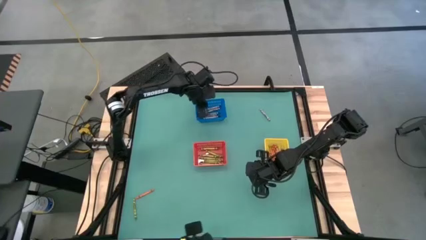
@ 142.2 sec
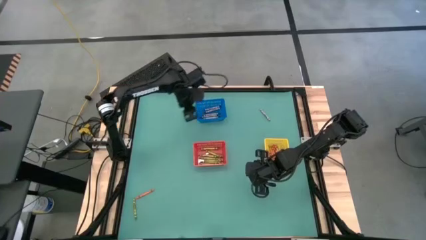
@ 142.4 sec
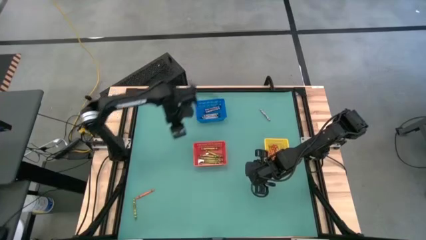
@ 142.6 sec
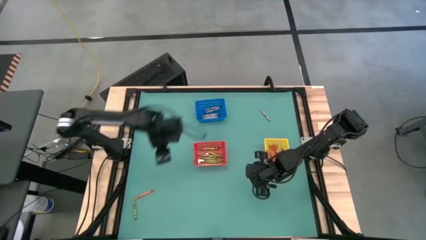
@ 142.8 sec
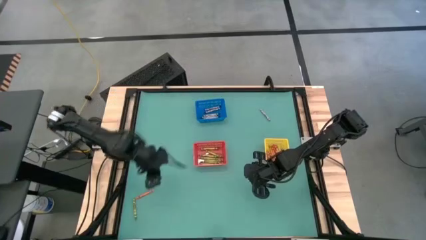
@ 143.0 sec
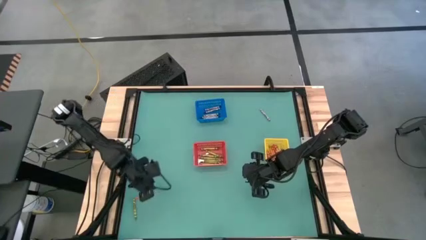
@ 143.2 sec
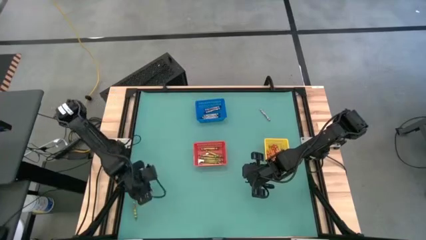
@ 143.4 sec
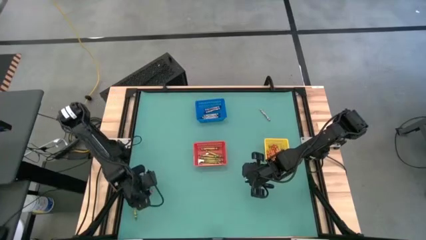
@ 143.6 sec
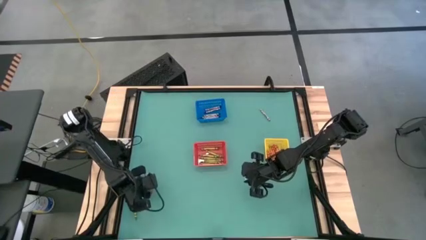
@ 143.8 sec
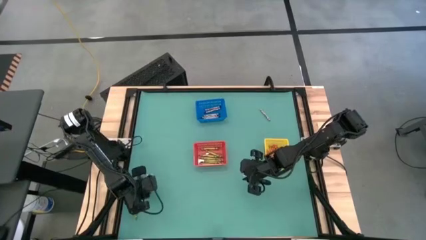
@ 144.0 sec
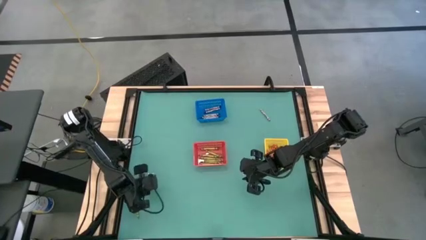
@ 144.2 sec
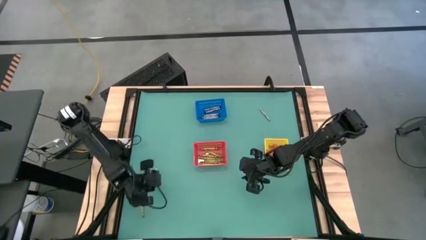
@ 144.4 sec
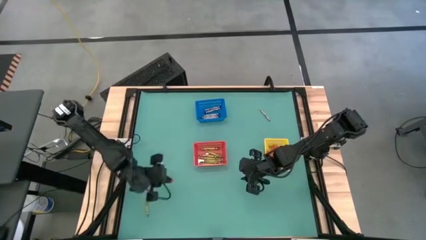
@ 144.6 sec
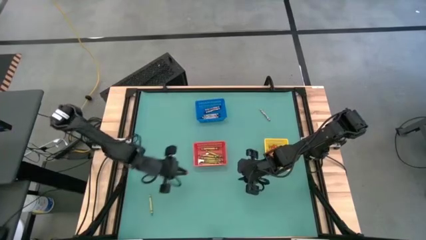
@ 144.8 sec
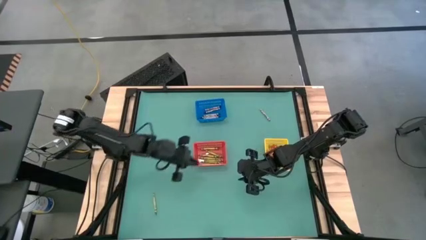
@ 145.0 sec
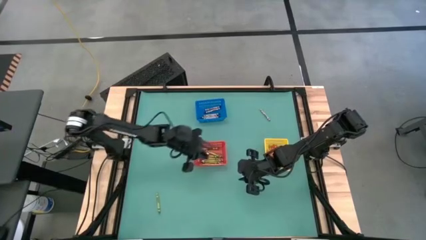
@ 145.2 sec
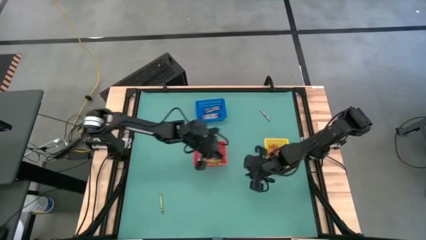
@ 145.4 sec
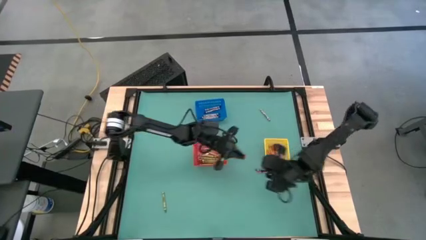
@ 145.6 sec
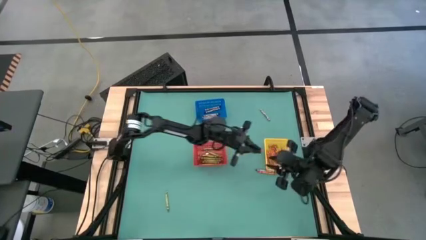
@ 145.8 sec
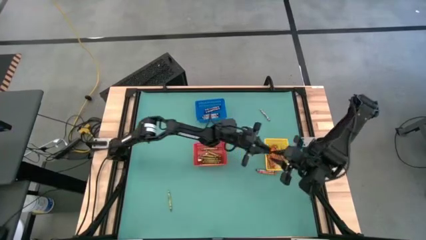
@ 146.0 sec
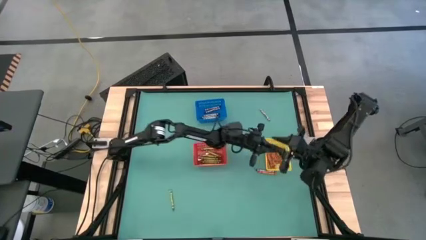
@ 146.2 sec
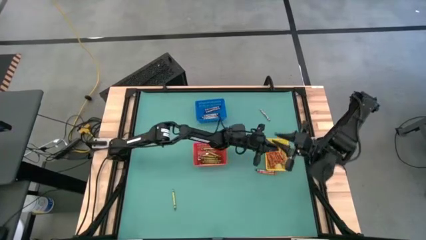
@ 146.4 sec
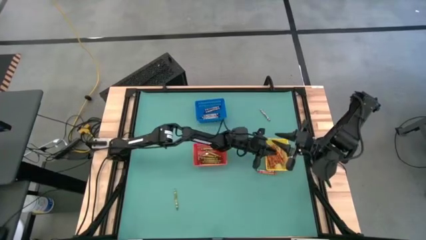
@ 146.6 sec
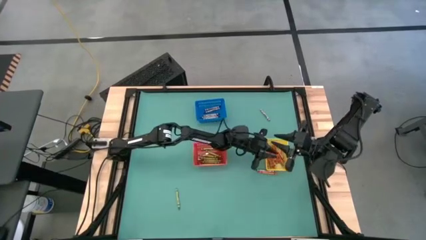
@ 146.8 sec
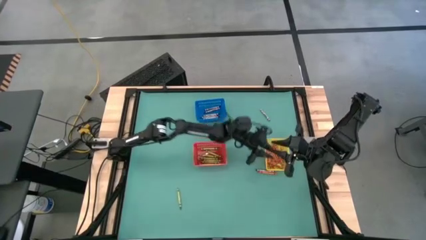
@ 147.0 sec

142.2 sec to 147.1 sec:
Task: Sort crayons
Put the orange crayon into the yellow bin

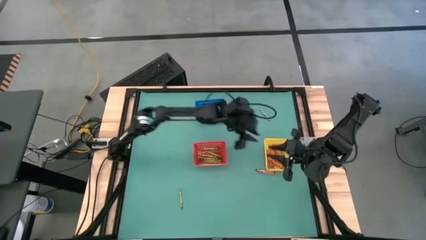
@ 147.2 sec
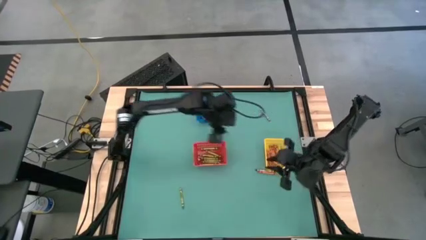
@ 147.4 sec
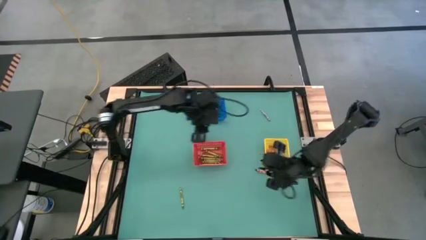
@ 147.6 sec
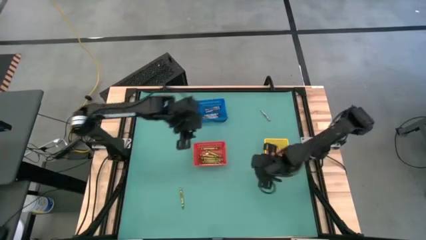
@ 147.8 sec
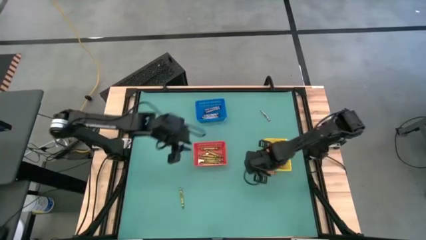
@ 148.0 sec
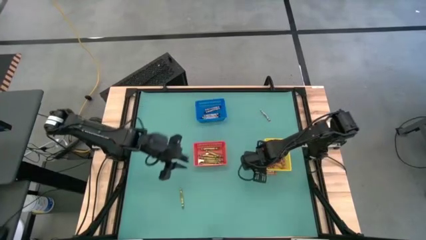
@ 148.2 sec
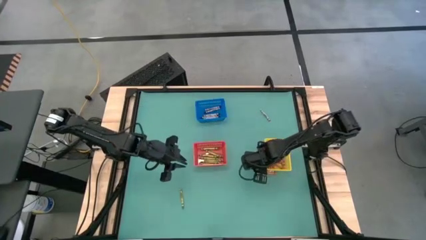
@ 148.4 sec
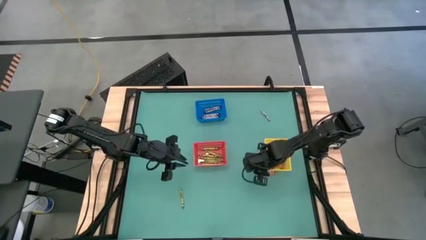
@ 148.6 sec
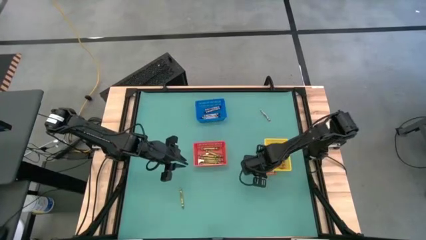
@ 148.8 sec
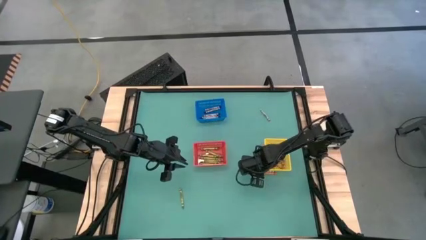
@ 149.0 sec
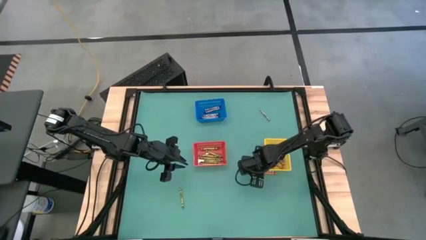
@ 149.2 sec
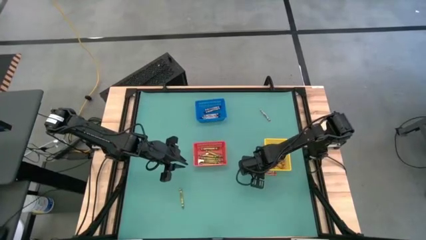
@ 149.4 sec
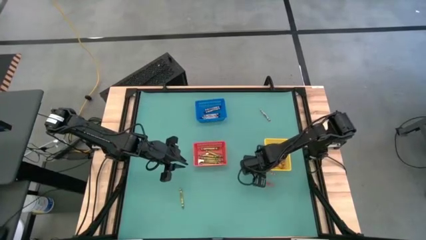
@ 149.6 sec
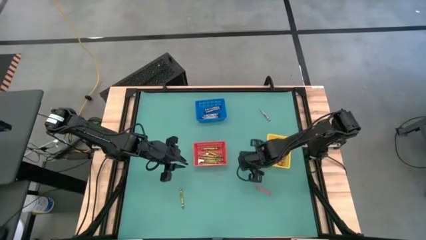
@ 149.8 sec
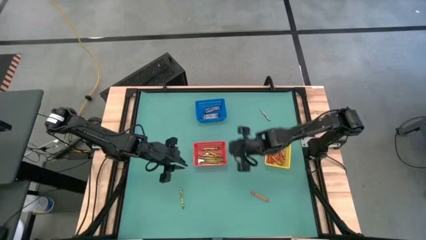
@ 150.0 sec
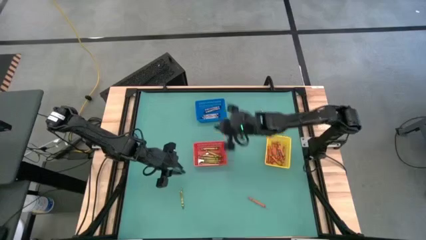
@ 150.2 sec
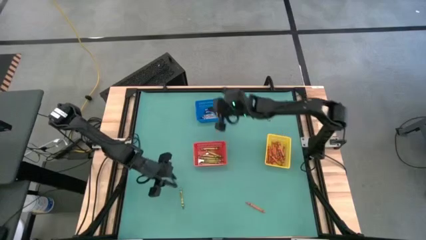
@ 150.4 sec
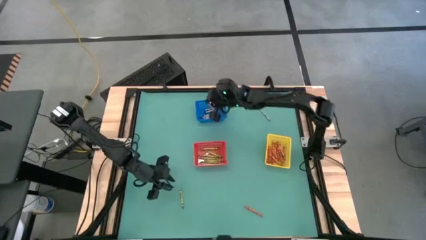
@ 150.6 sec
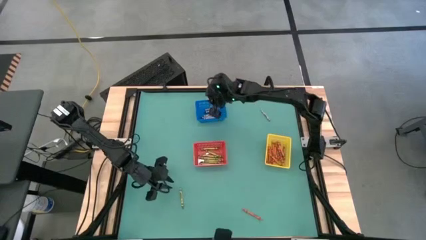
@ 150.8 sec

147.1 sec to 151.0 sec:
Put the black crayon into the blue bin

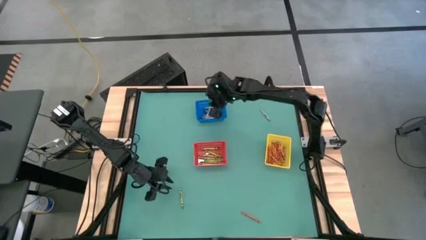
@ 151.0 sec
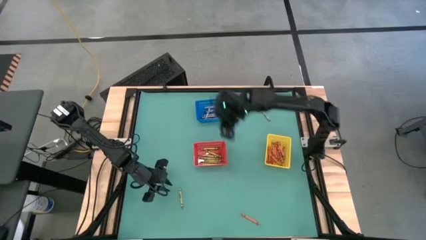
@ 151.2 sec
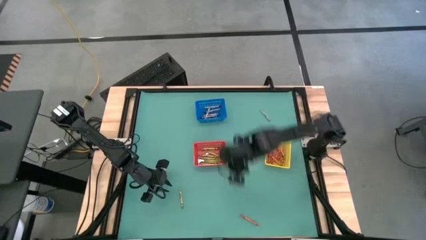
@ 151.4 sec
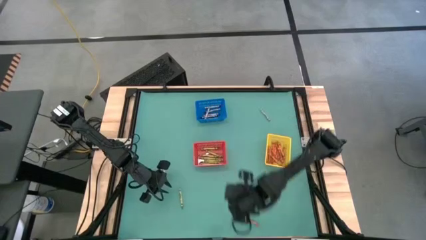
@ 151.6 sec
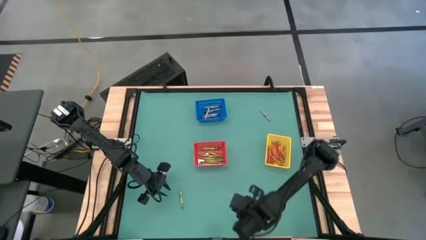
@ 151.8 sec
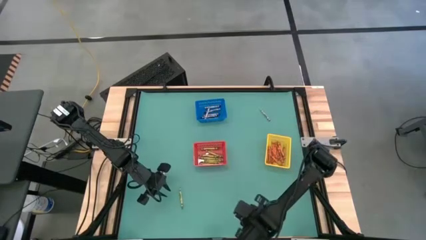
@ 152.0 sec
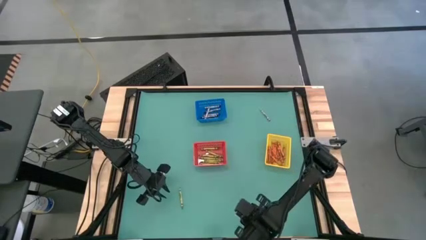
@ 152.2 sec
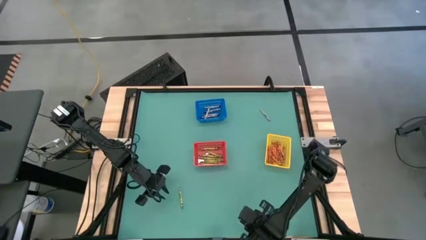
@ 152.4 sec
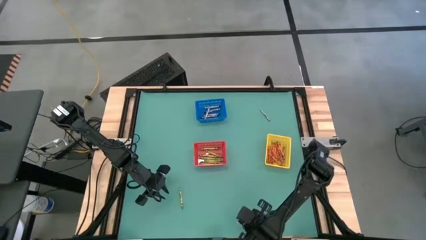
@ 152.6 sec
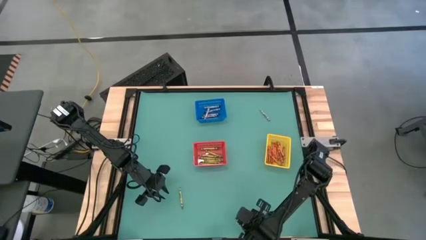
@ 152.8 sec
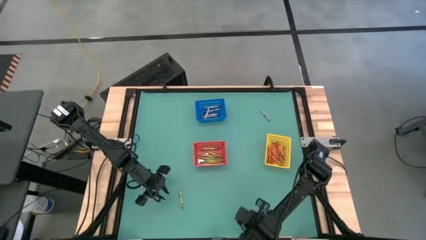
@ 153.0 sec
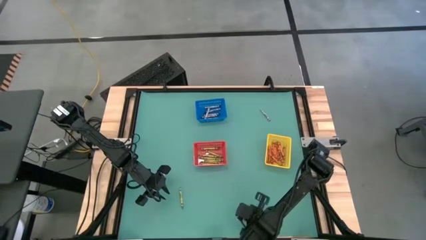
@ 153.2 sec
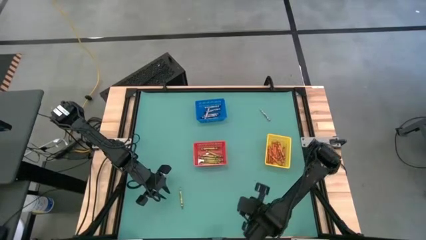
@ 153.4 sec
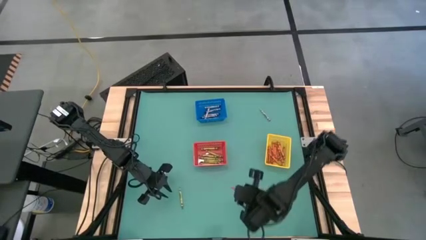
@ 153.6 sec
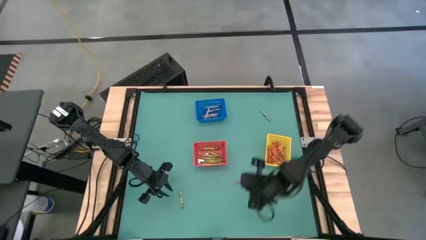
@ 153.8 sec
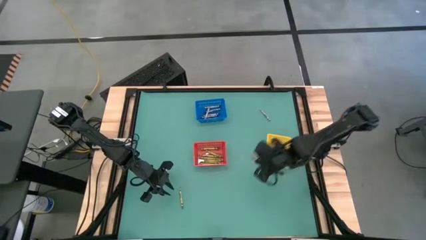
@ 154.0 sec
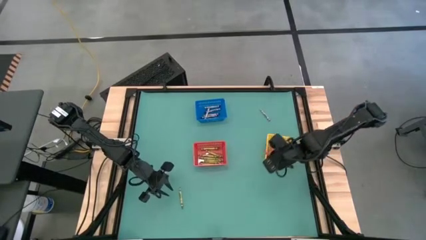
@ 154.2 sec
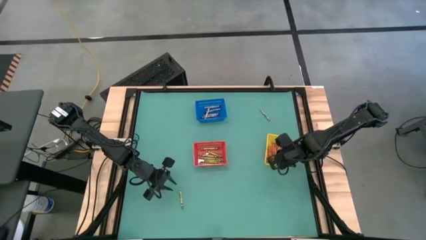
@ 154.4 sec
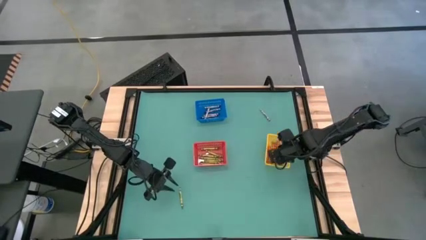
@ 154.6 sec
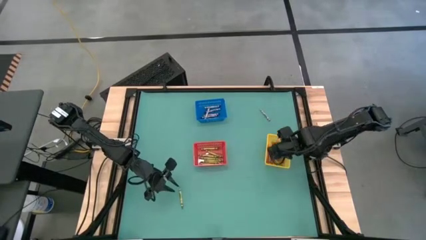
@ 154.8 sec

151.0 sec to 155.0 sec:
Put the orange crayon into the yellow bin

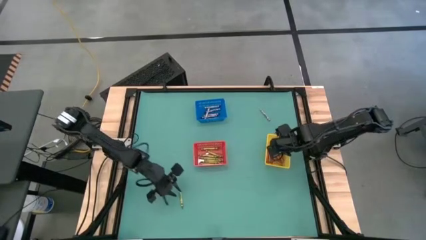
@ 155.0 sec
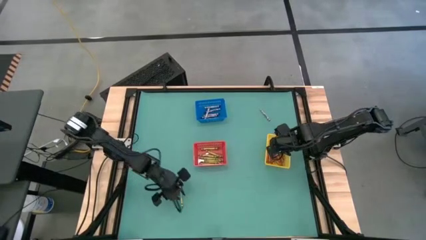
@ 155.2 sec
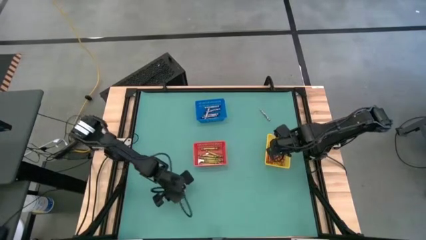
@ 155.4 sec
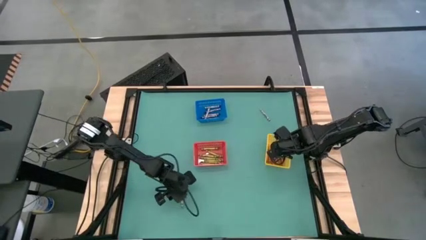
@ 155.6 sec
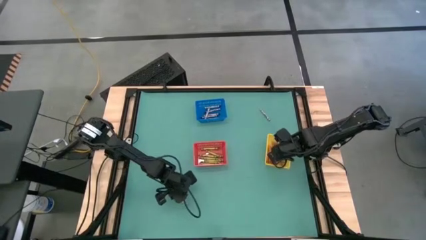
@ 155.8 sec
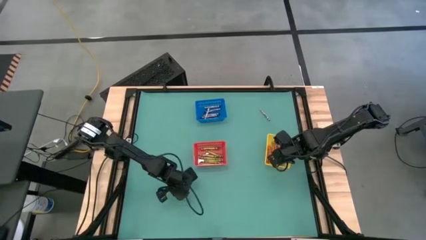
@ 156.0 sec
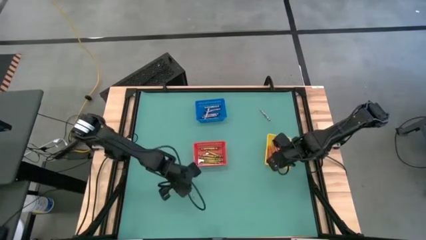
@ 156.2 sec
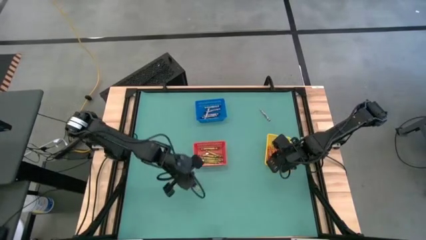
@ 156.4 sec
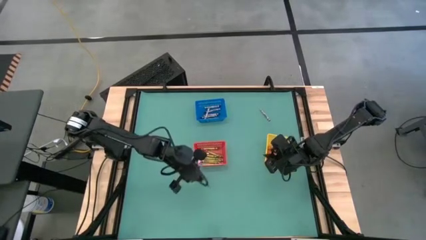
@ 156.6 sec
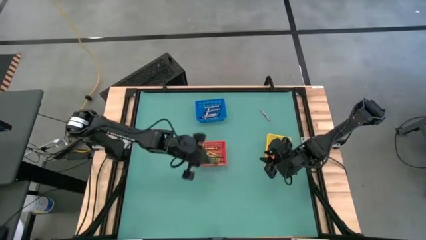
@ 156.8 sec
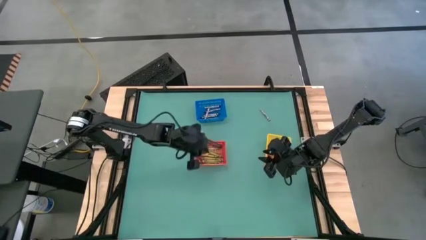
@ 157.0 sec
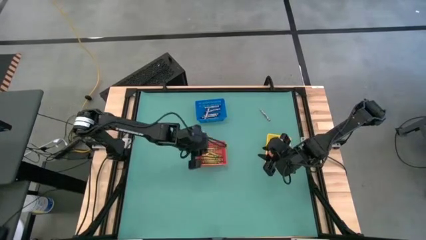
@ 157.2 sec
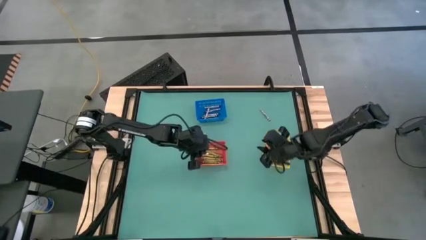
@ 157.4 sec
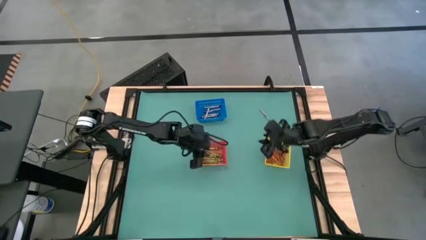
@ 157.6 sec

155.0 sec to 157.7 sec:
Put the green crayon into the red bin

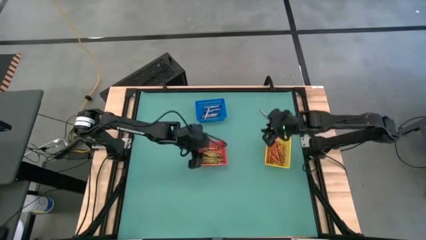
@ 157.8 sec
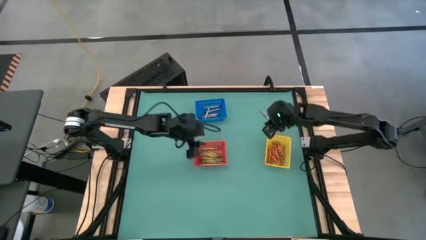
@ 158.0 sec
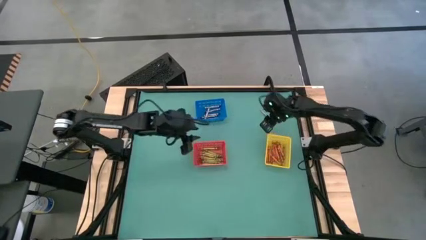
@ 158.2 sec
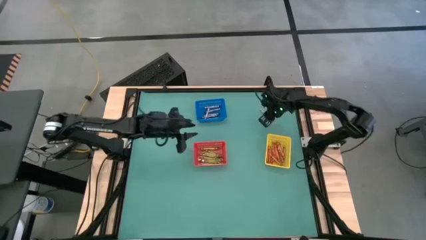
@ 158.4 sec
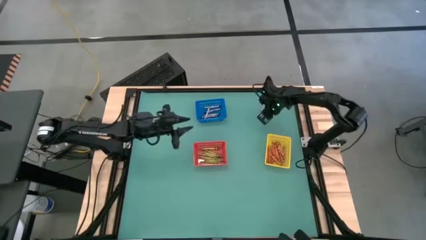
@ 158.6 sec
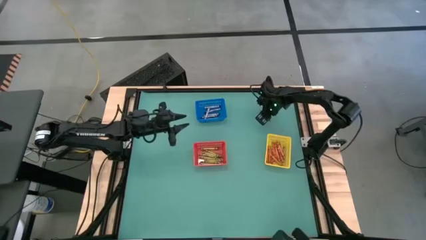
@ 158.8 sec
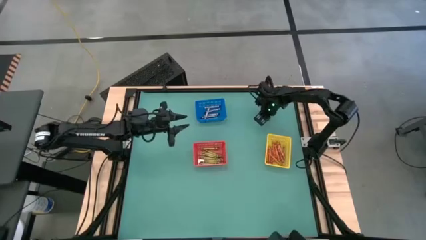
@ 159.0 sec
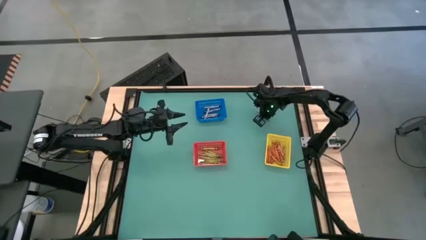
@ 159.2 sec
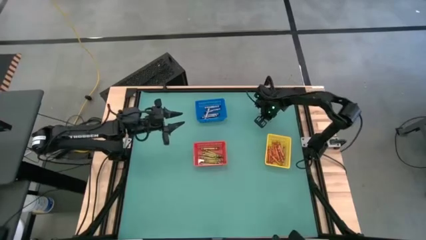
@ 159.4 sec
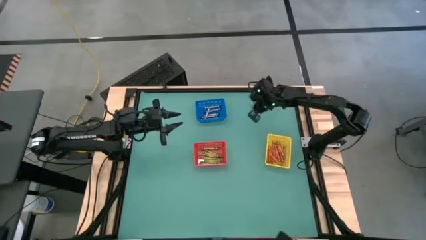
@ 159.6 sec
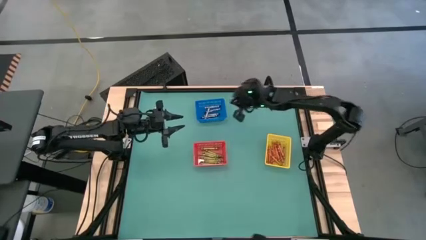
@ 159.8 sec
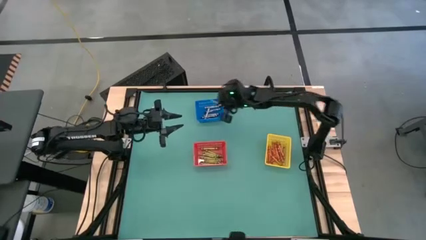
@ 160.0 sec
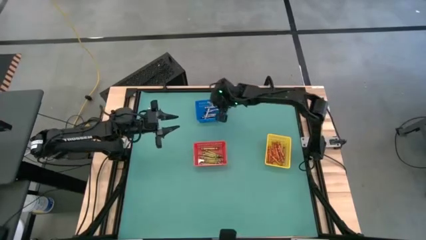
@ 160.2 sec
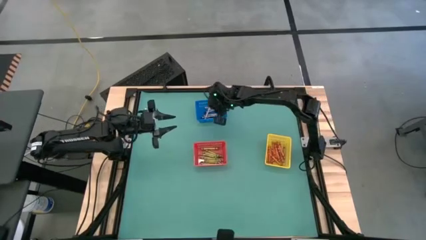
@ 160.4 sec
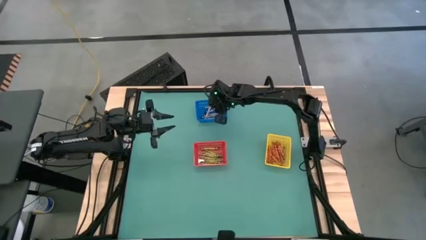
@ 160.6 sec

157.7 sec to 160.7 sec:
Put the black crayon into the blue bin
